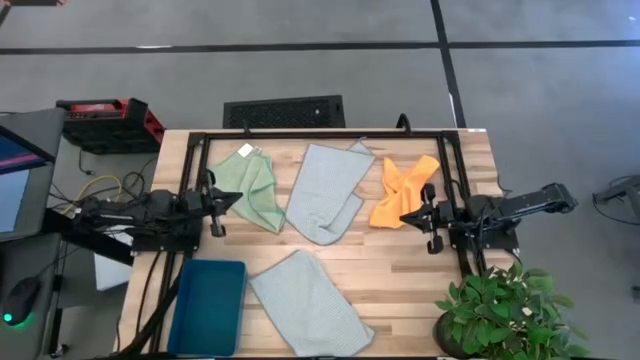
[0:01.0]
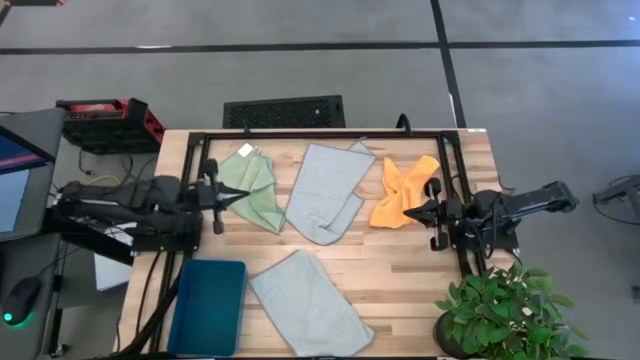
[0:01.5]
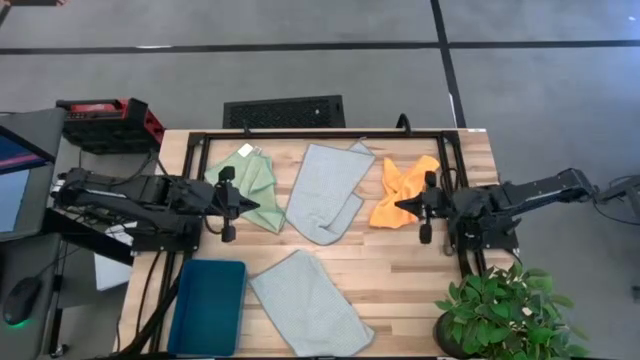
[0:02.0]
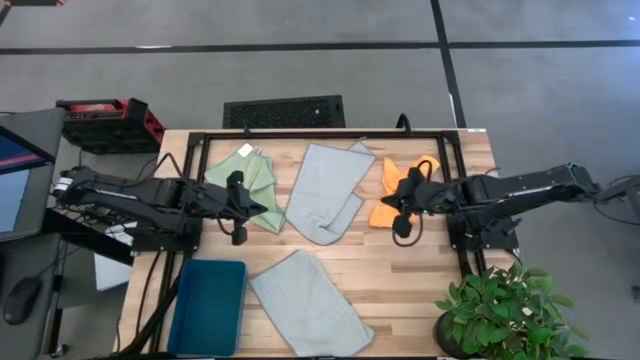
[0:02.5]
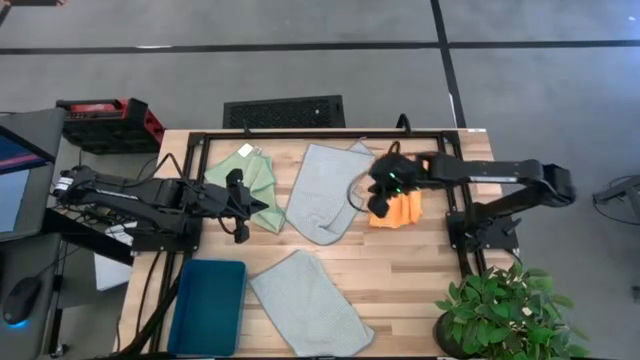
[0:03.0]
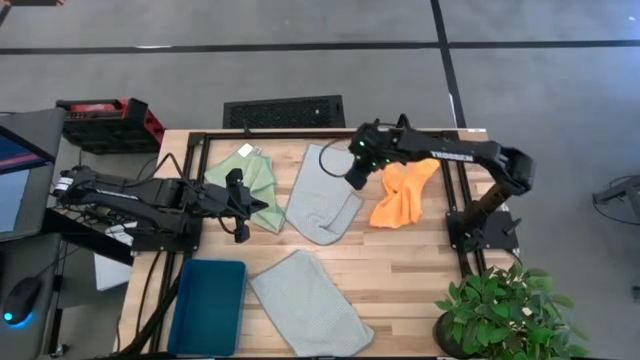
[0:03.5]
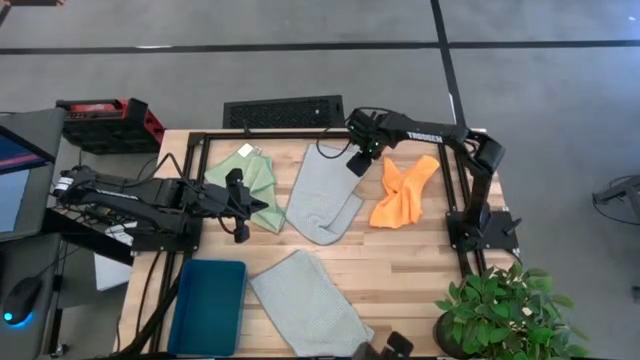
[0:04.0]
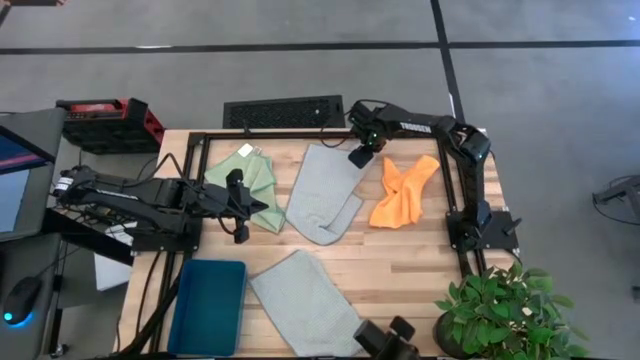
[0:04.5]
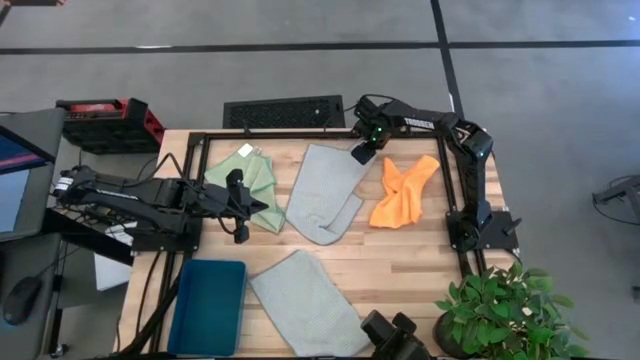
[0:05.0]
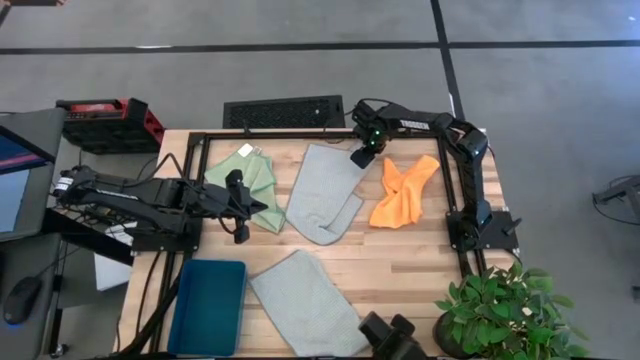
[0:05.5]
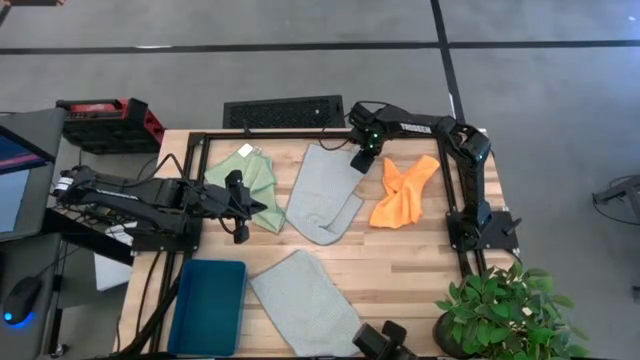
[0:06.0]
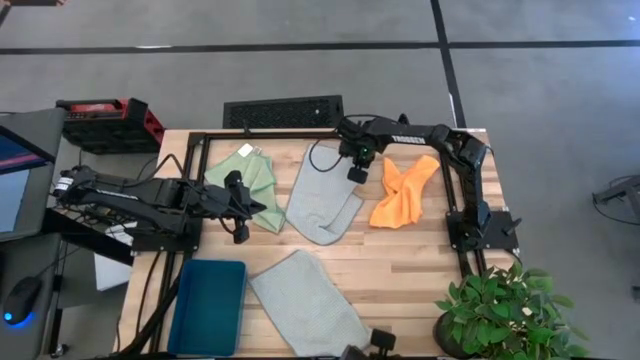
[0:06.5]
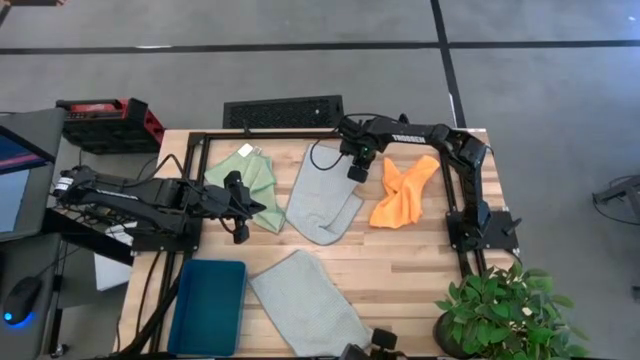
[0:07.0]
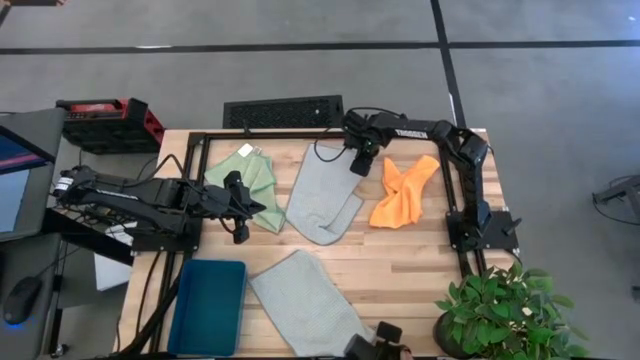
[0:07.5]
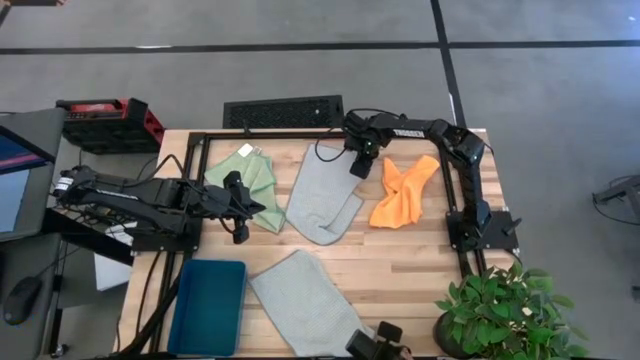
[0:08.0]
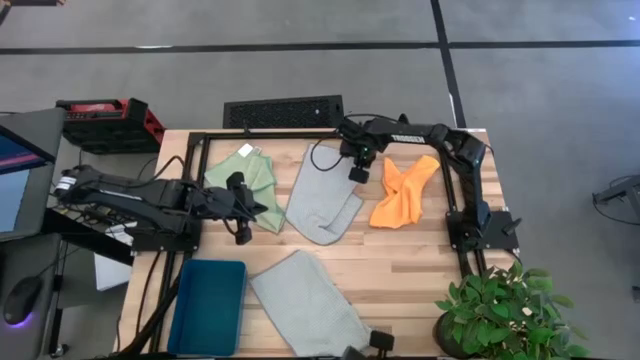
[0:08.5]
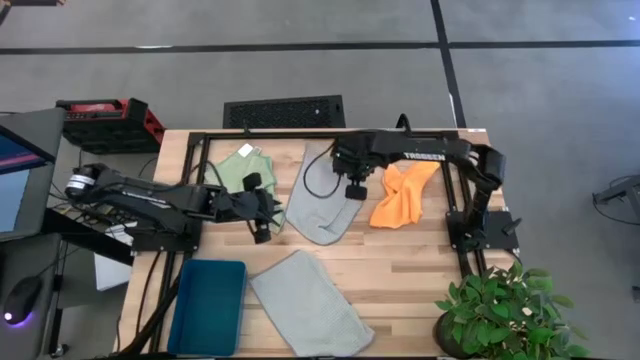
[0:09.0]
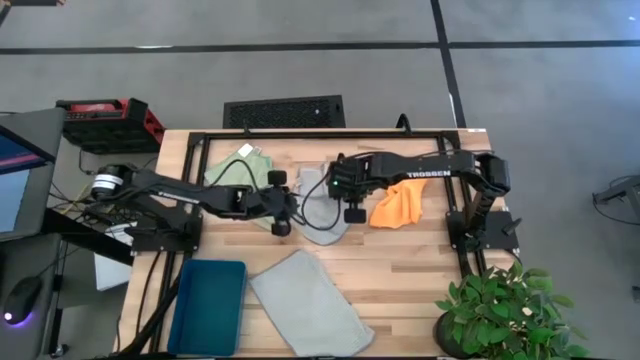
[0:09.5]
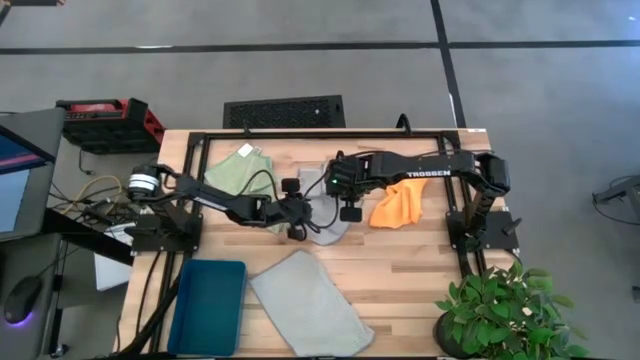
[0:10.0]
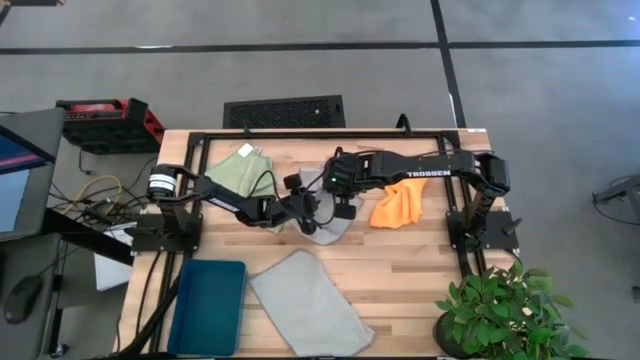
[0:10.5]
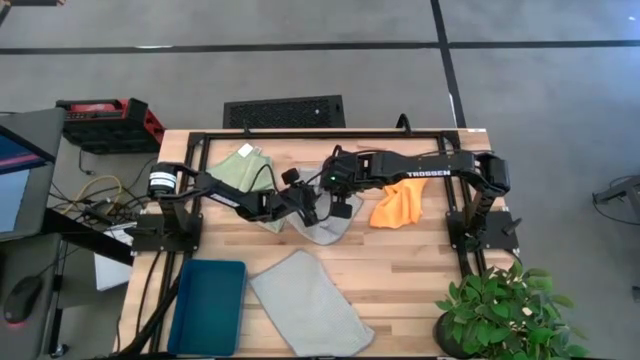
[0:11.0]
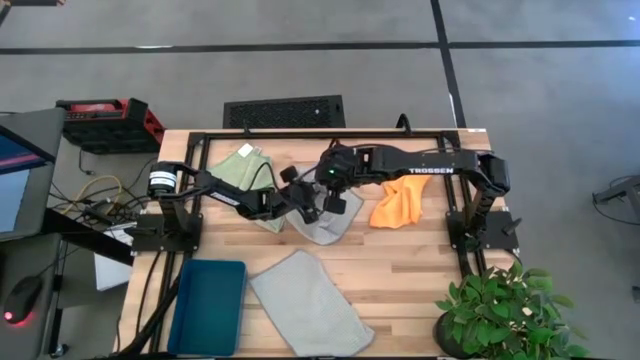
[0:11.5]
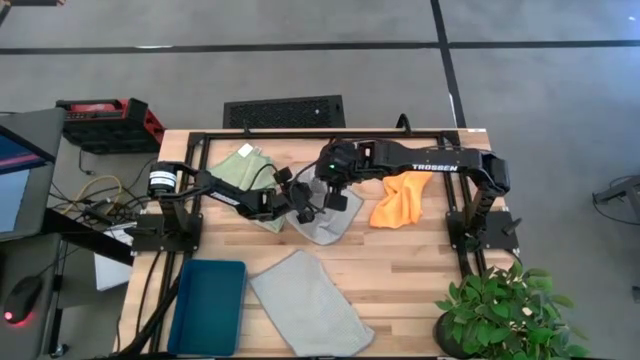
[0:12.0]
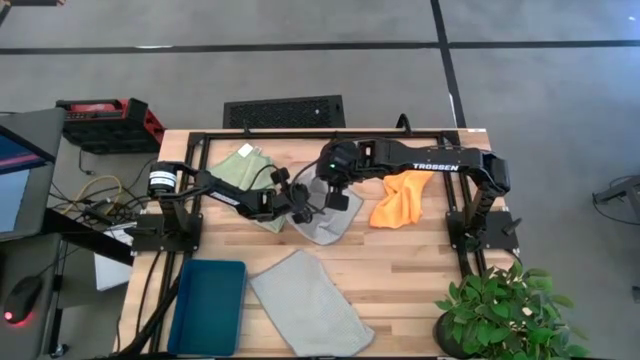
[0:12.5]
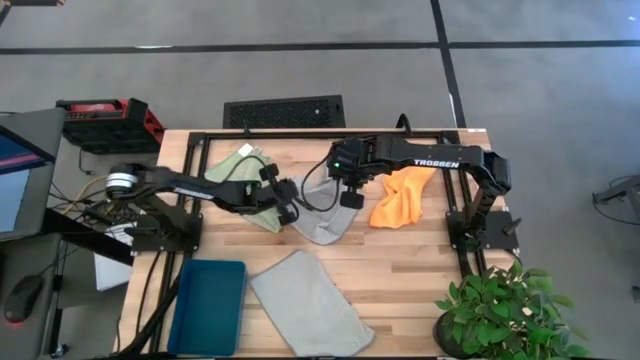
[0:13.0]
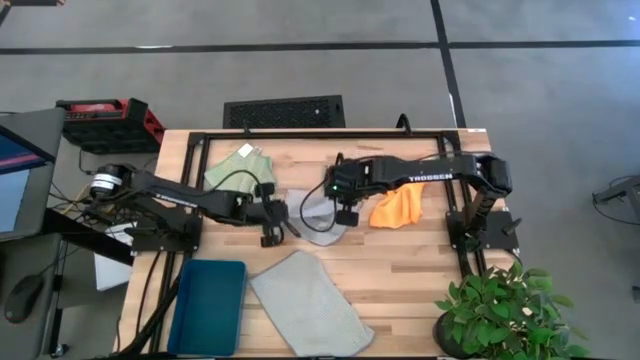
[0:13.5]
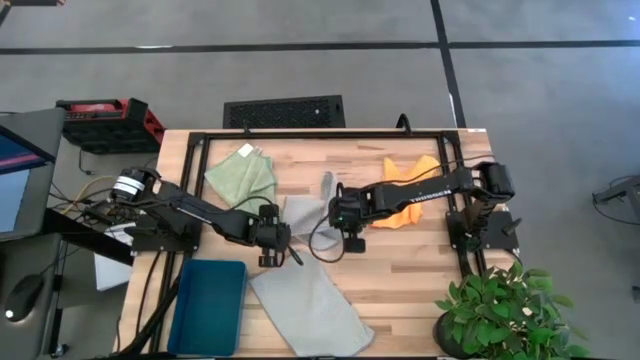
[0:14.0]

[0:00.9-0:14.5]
Task: Fold microfiber towels
Fold the top gray microfiber towel
